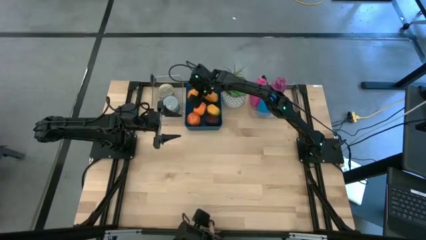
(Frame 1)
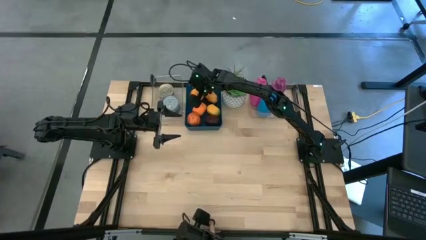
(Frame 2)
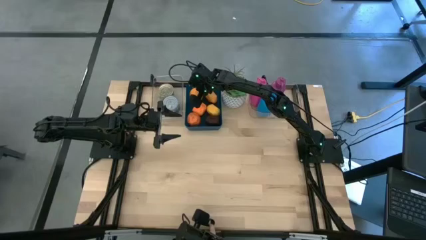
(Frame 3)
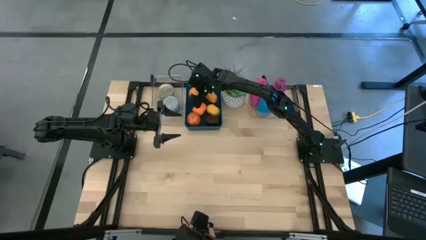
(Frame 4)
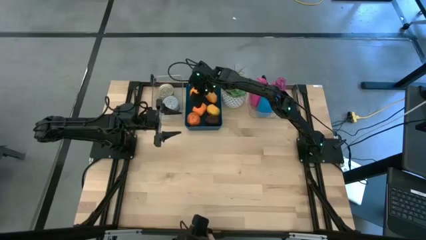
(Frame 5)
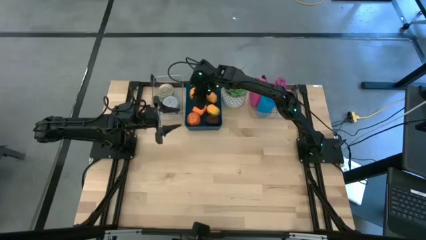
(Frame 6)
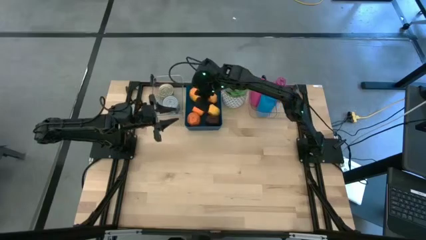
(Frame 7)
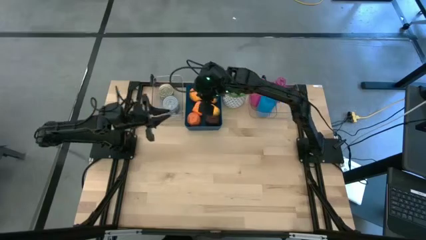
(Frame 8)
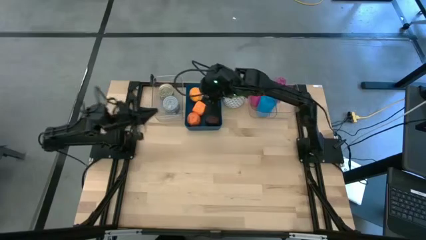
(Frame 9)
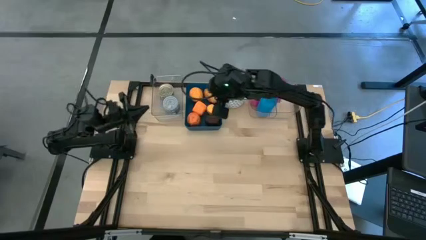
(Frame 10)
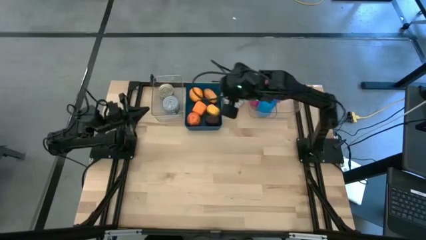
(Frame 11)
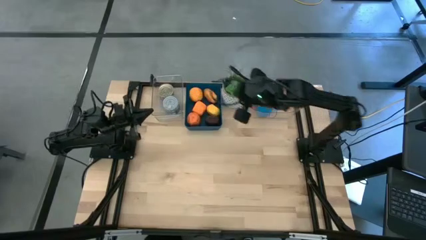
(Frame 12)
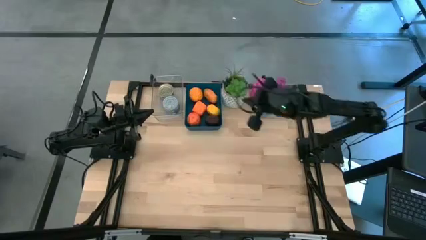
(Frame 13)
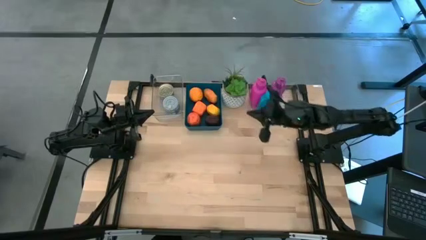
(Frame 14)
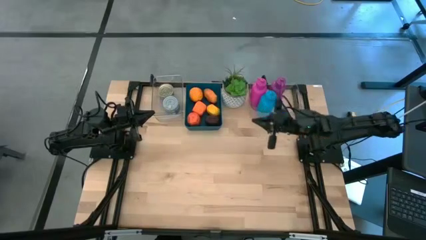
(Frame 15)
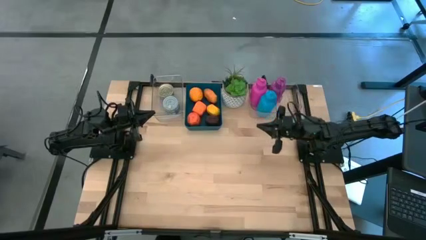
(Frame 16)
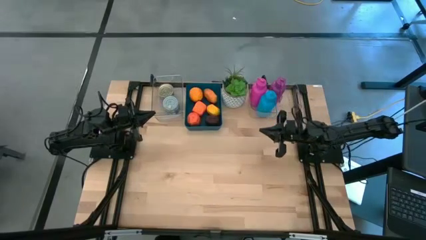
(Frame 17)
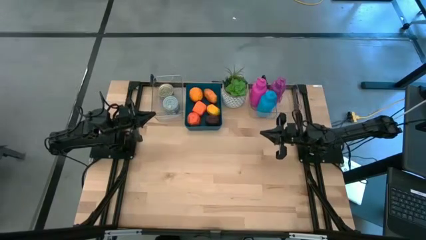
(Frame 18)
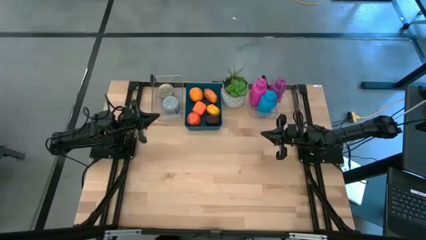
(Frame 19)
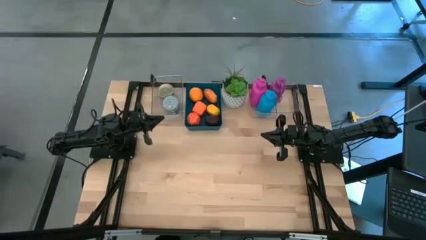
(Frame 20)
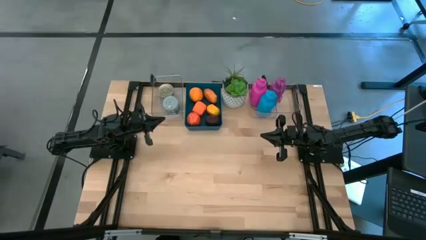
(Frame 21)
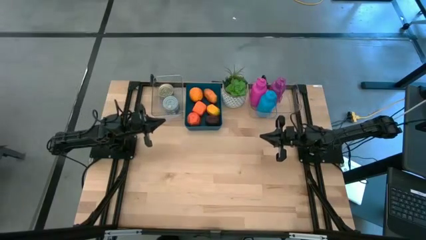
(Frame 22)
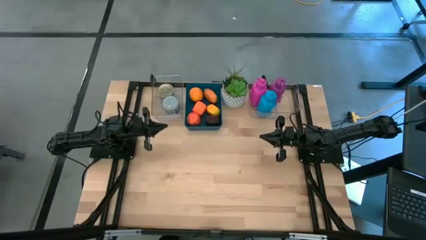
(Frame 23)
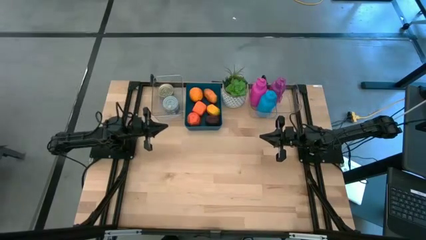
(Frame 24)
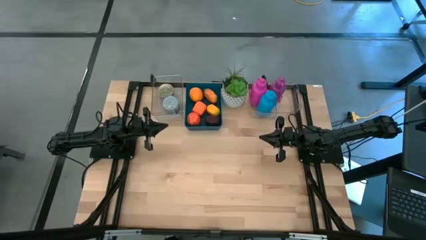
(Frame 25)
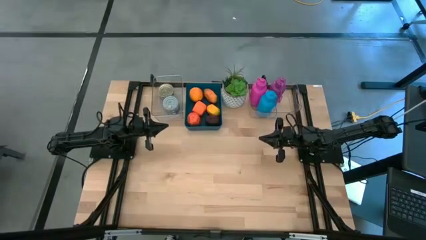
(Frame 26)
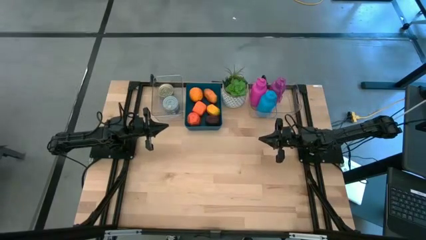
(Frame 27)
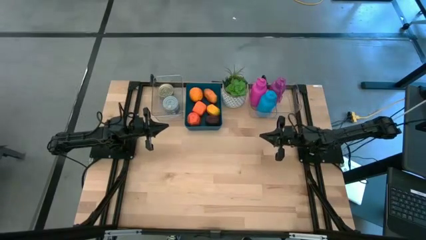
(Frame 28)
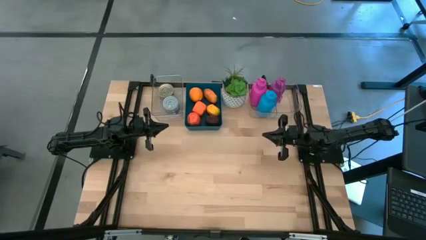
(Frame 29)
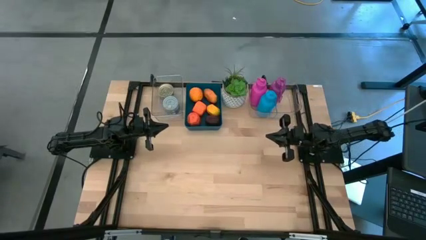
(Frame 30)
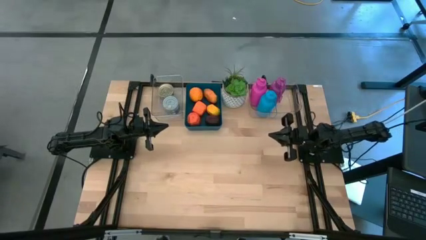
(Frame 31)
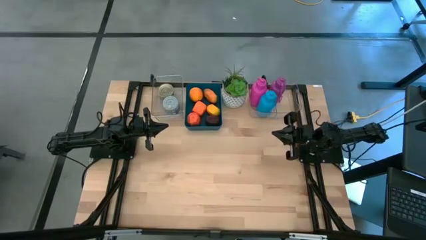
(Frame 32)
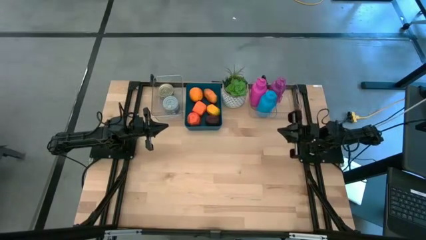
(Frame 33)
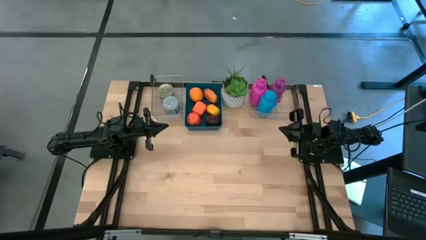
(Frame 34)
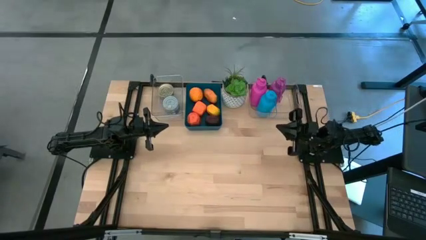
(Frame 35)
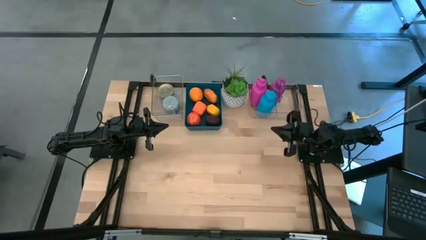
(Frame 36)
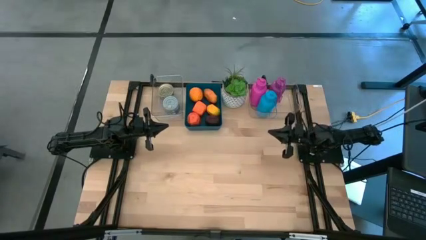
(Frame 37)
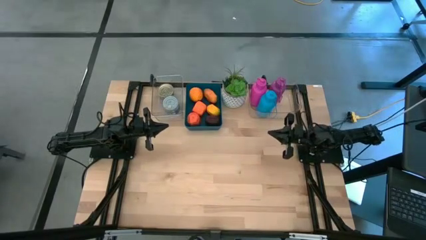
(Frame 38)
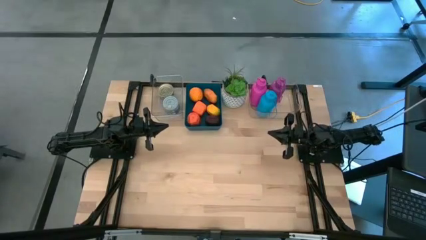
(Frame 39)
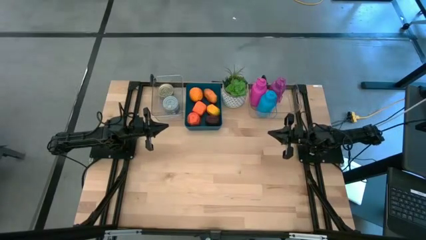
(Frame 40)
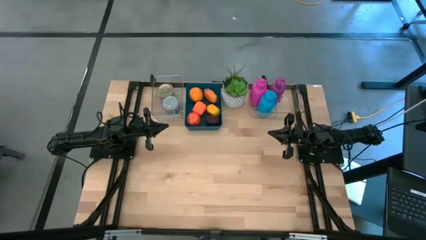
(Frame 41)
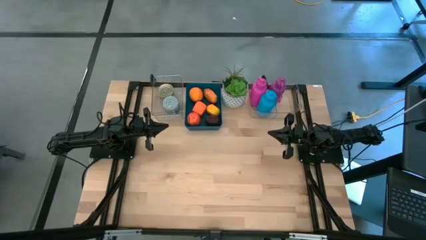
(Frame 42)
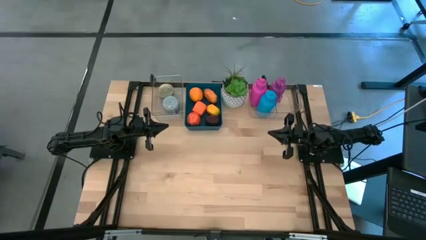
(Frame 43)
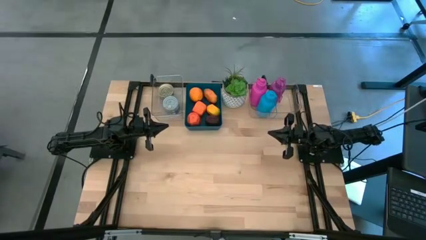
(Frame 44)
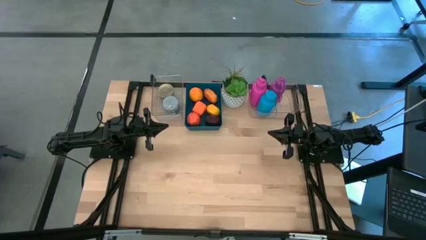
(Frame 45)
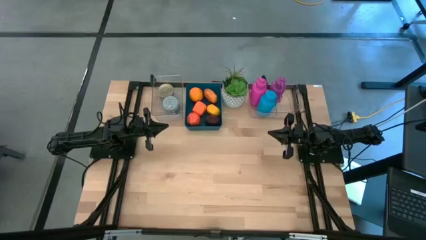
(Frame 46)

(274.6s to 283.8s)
Task: Pick & Place Food Item
Return to home position

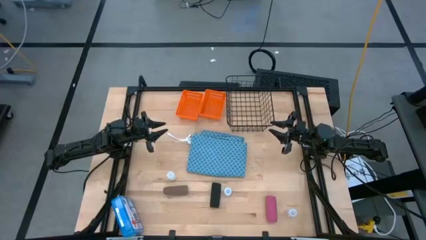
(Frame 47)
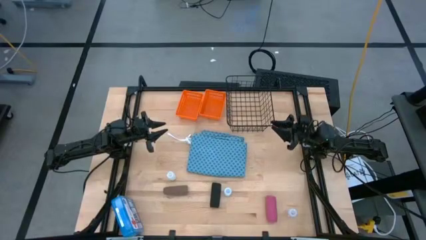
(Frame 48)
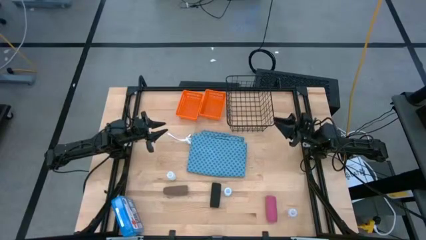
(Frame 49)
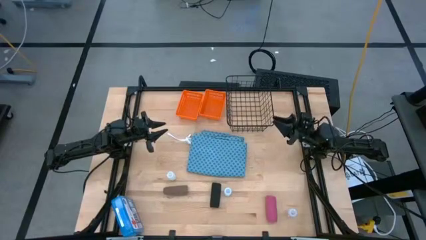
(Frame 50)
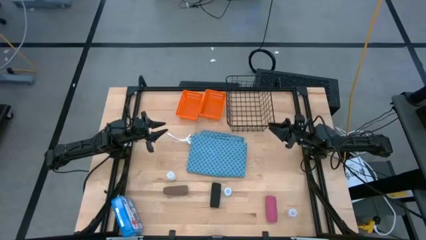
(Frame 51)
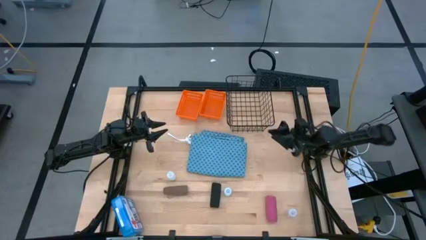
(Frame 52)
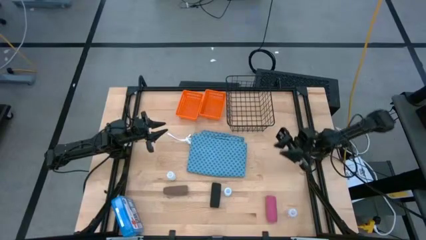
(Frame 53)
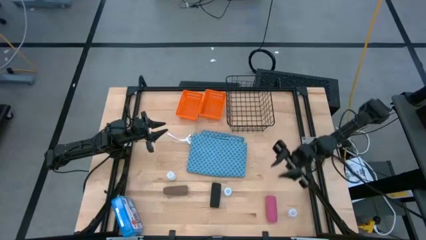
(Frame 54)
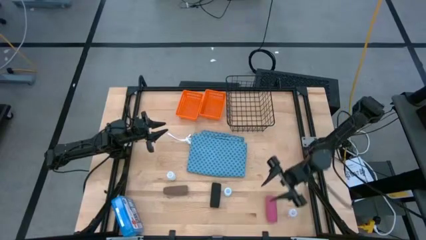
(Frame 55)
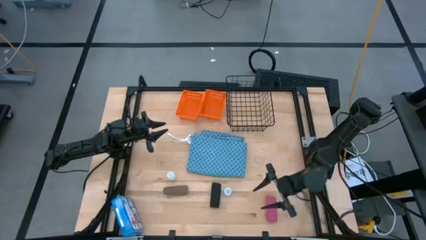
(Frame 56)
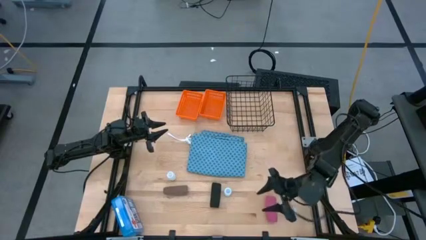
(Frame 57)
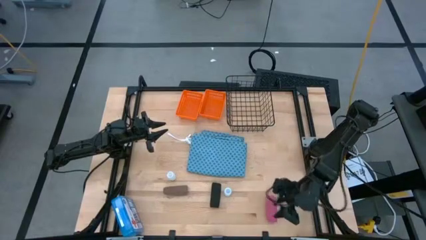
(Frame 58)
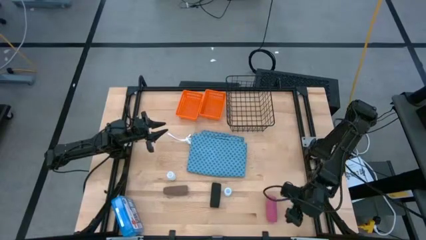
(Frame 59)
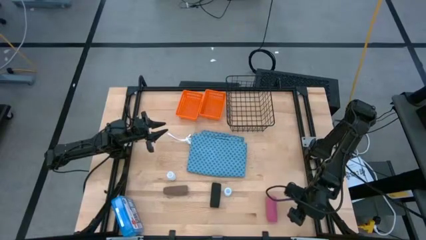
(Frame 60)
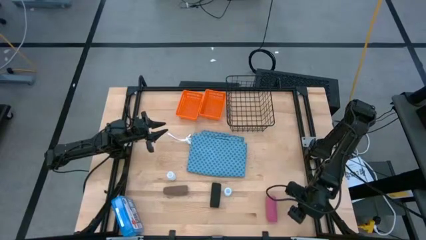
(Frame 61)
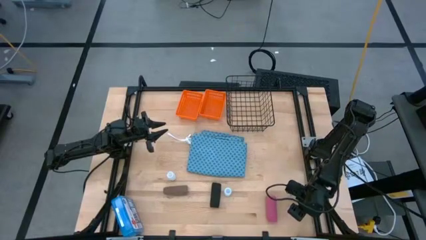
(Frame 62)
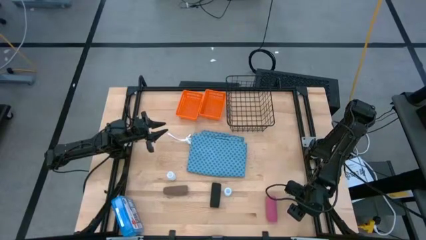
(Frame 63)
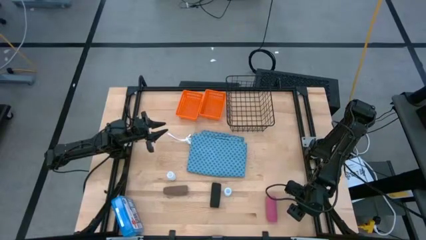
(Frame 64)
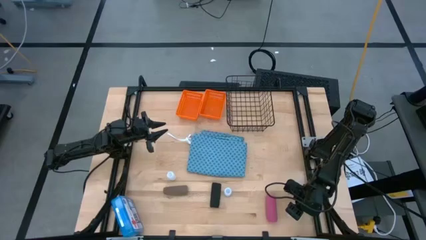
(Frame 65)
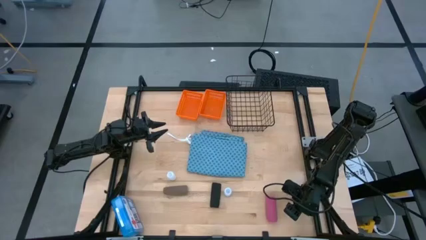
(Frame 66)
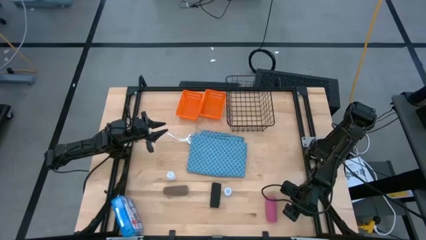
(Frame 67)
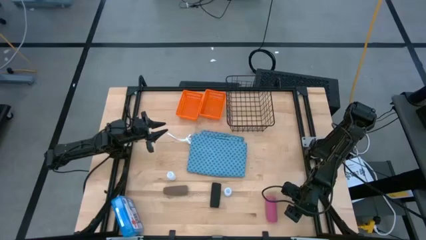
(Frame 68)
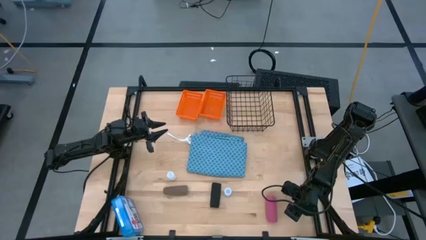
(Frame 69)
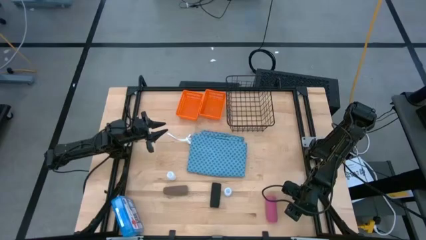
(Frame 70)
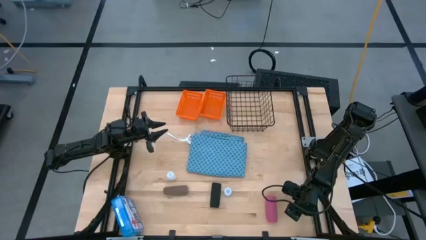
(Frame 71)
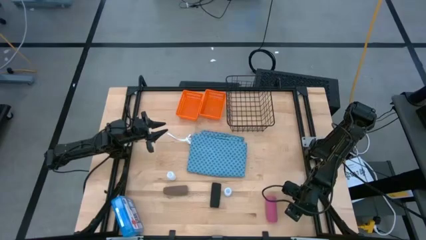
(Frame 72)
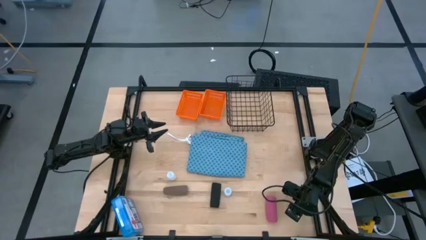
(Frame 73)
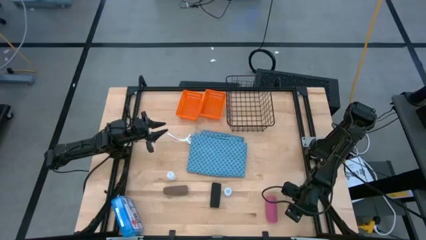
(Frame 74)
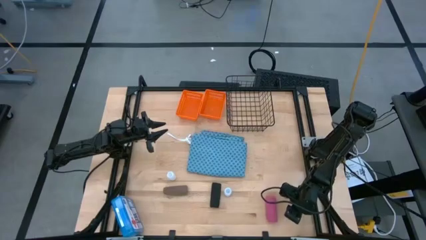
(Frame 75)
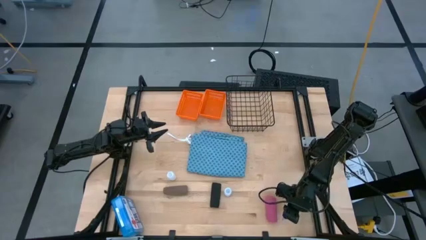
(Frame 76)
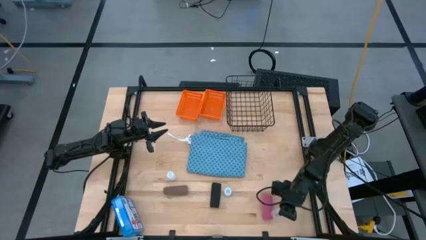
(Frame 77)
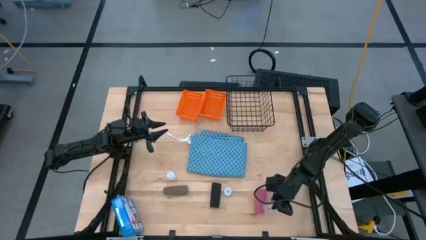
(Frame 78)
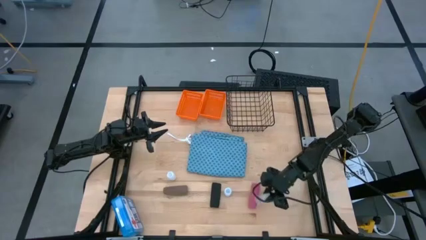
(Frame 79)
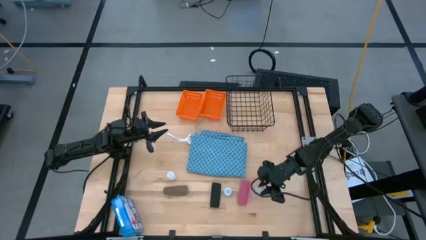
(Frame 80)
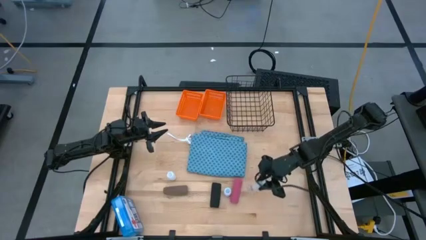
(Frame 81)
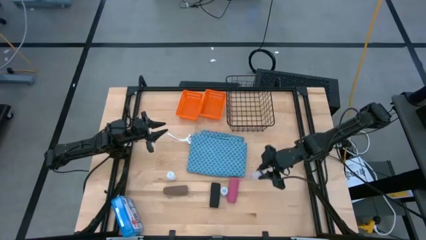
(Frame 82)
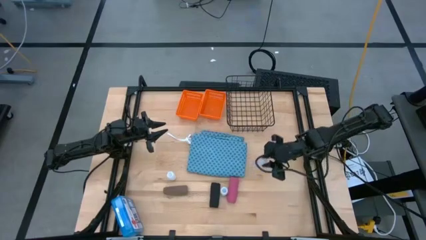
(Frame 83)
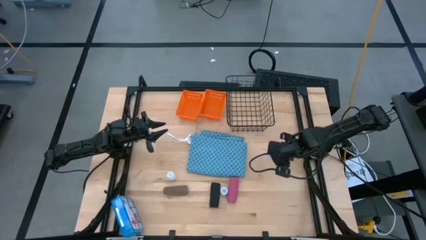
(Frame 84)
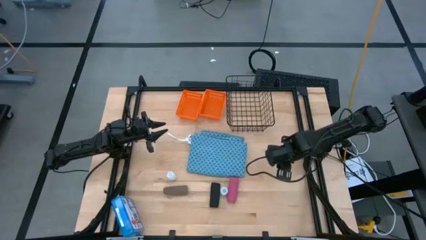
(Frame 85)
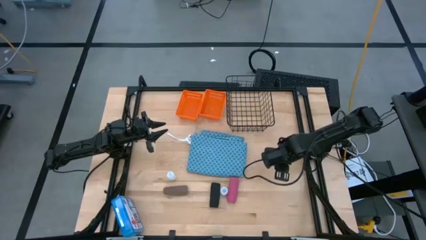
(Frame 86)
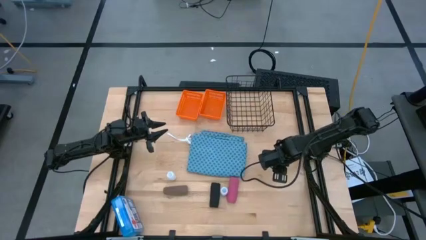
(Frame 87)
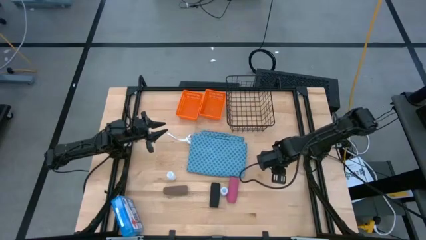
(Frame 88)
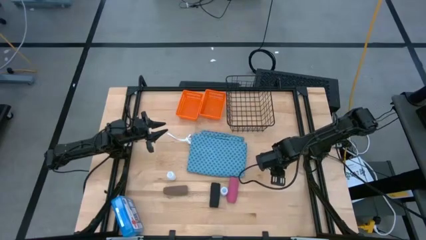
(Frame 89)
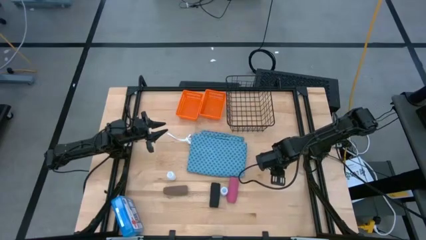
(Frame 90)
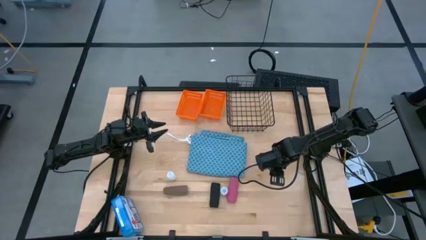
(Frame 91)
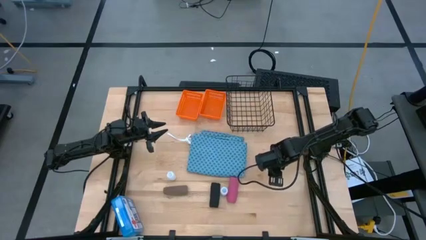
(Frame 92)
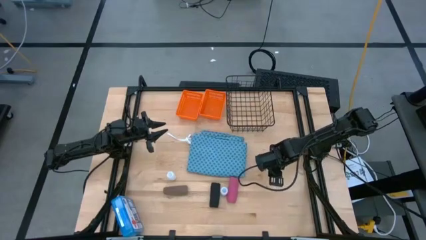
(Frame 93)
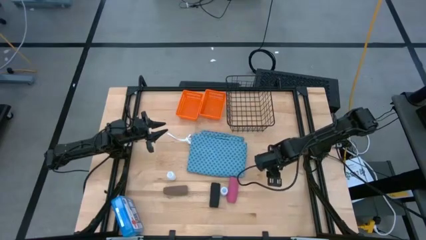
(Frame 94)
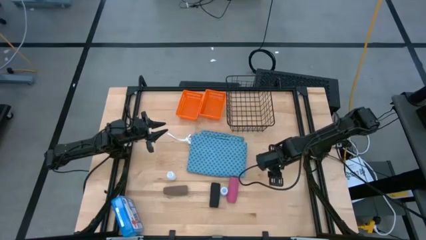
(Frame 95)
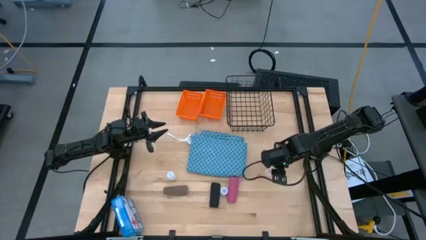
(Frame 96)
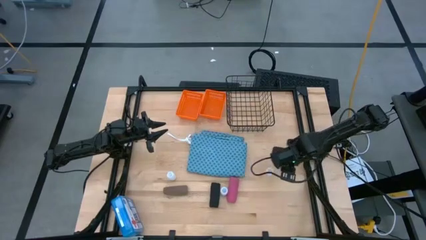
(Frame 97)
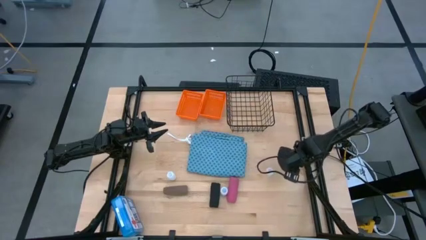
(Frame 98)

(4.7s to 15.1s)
Task: Pick & Place Medicine items
Put the right transparent pill bottle into the left orange basket
